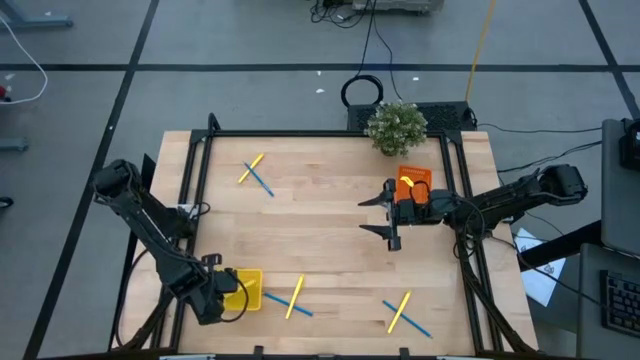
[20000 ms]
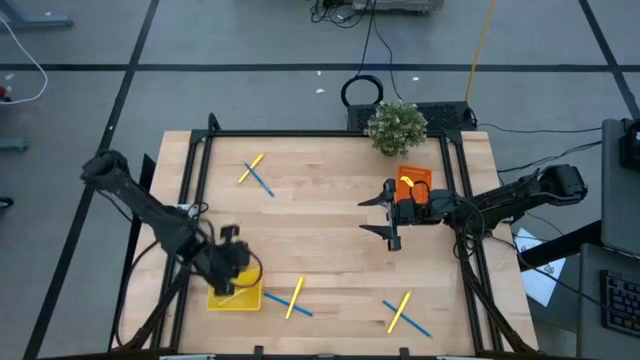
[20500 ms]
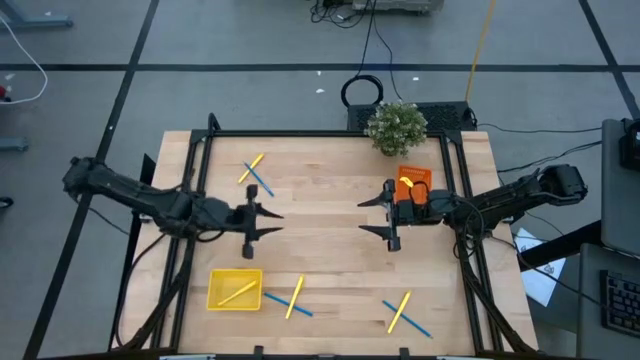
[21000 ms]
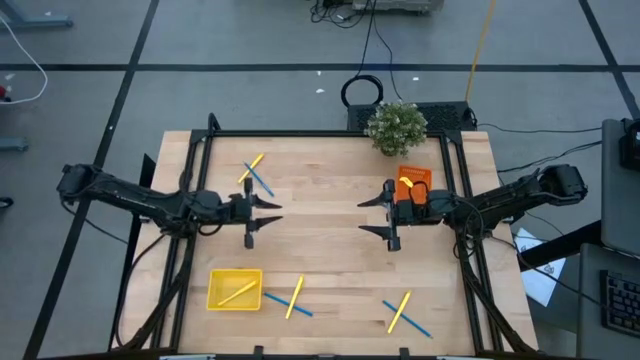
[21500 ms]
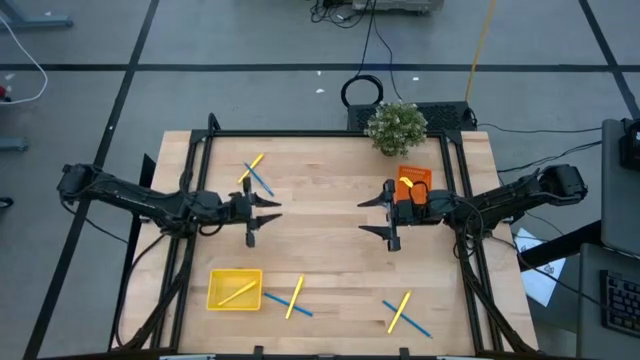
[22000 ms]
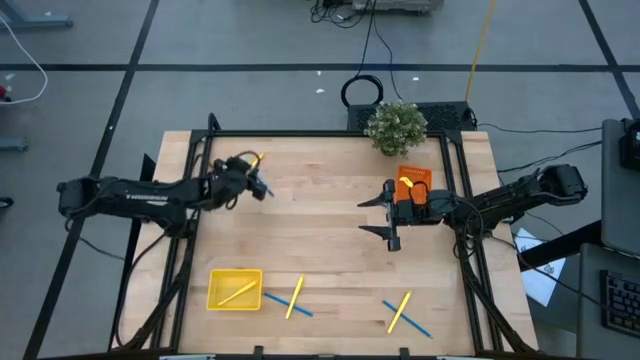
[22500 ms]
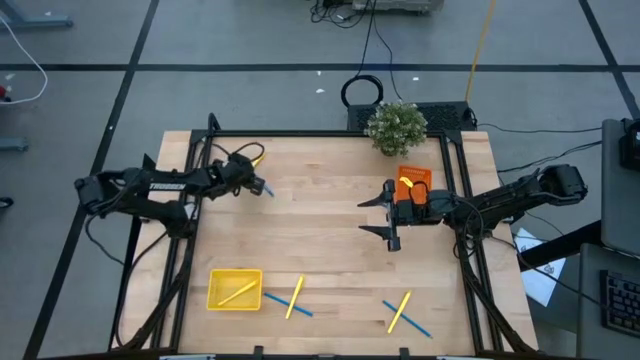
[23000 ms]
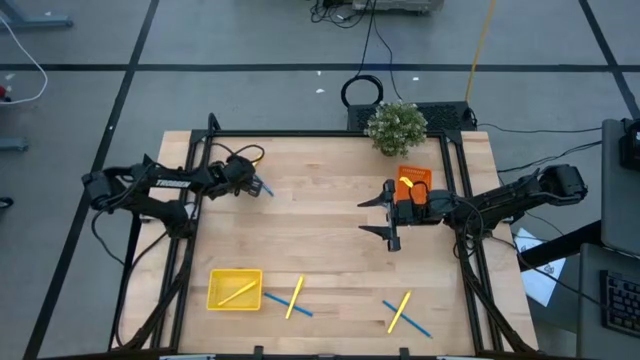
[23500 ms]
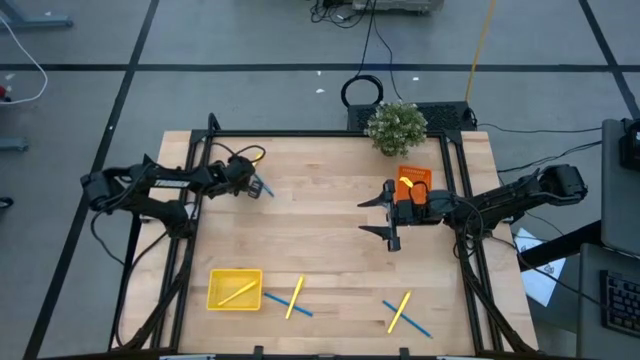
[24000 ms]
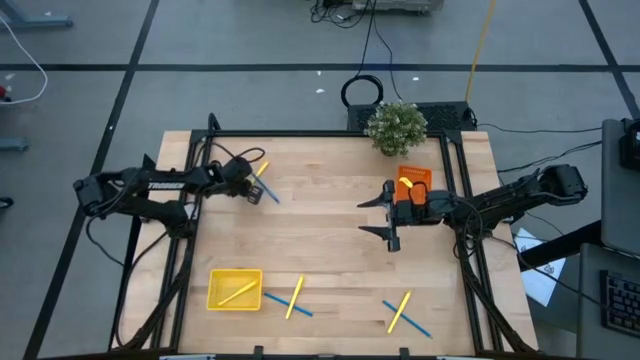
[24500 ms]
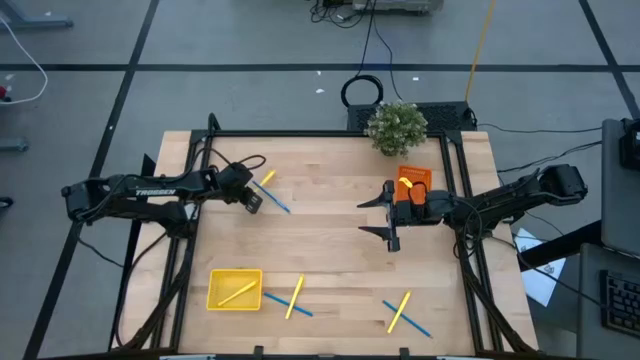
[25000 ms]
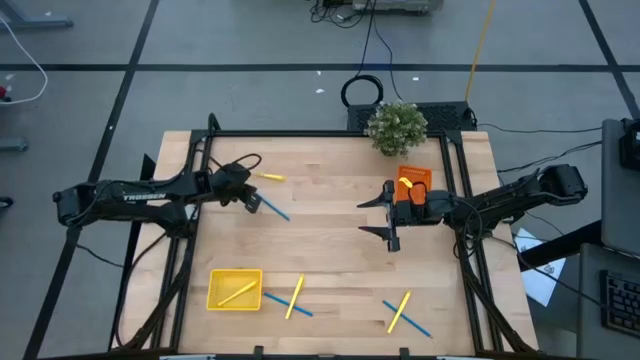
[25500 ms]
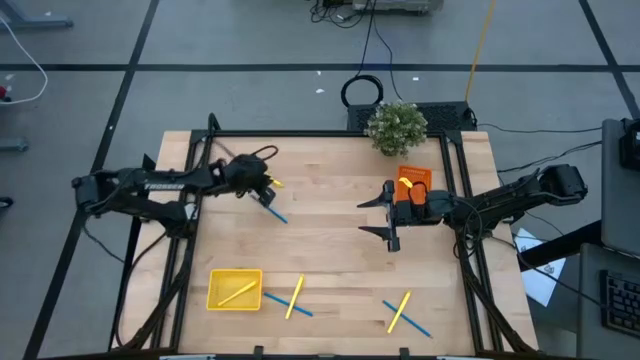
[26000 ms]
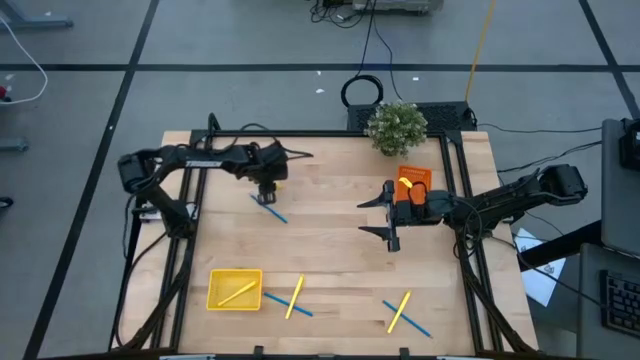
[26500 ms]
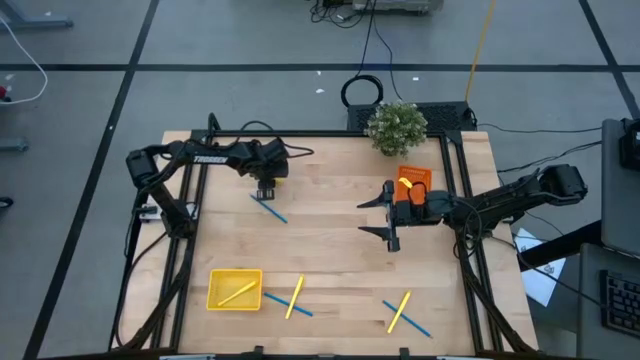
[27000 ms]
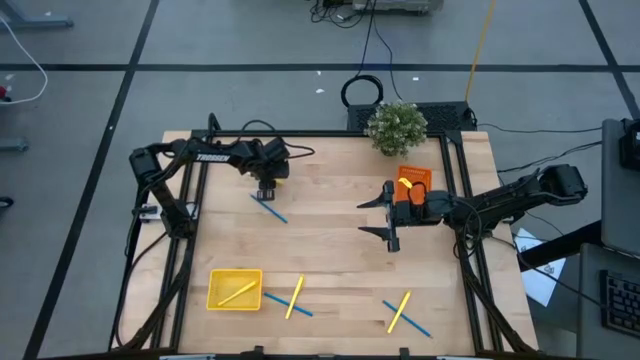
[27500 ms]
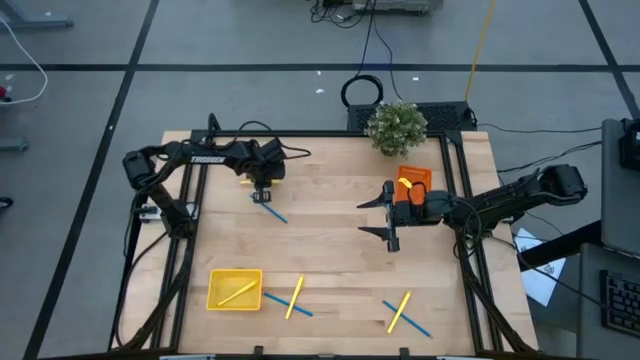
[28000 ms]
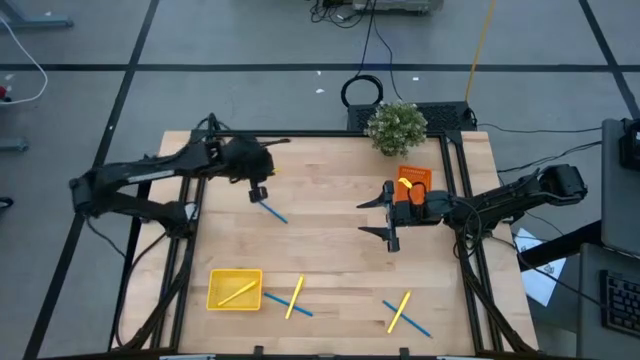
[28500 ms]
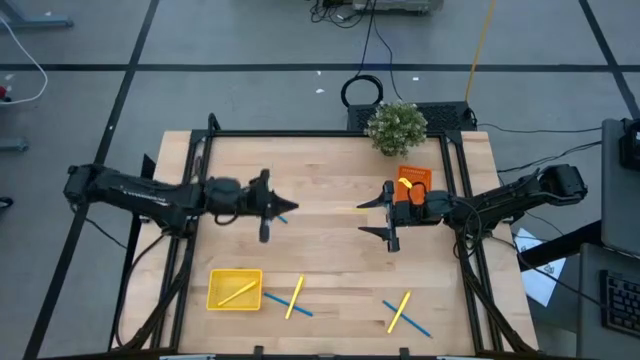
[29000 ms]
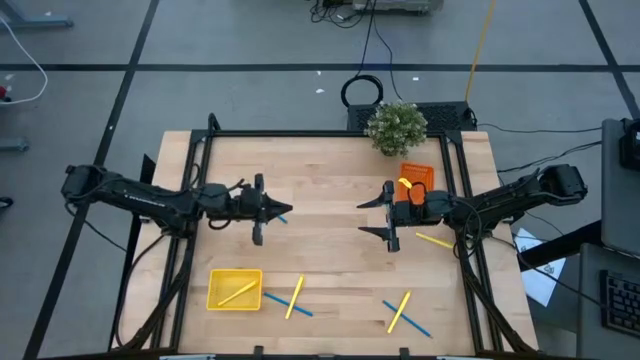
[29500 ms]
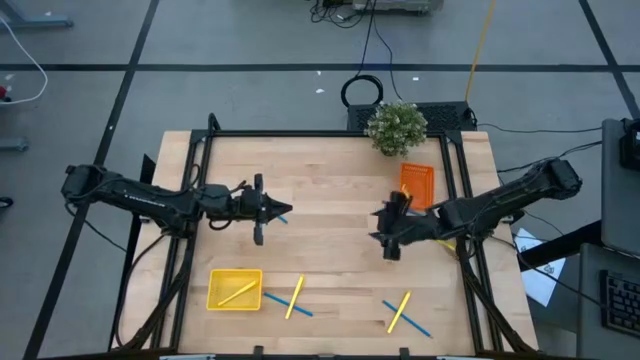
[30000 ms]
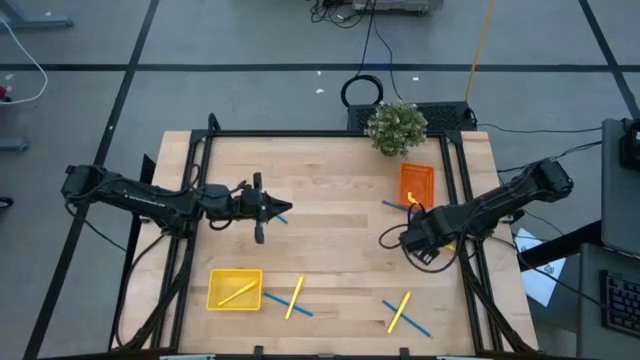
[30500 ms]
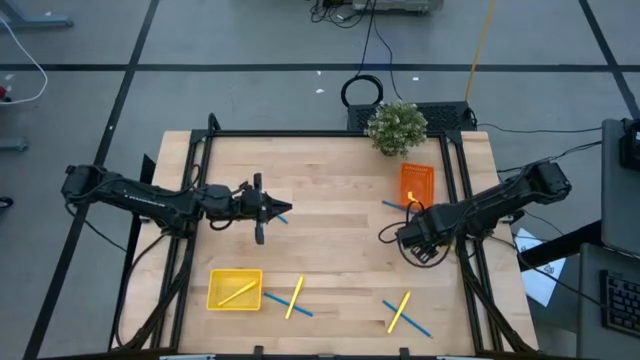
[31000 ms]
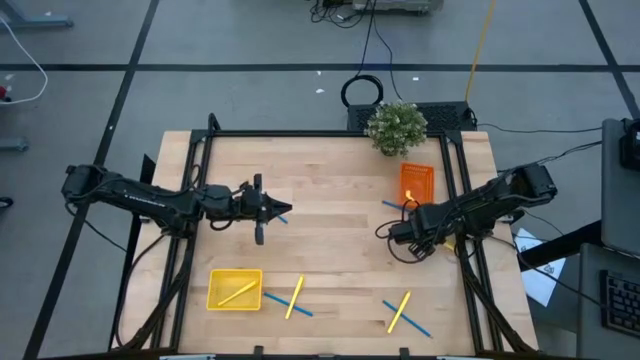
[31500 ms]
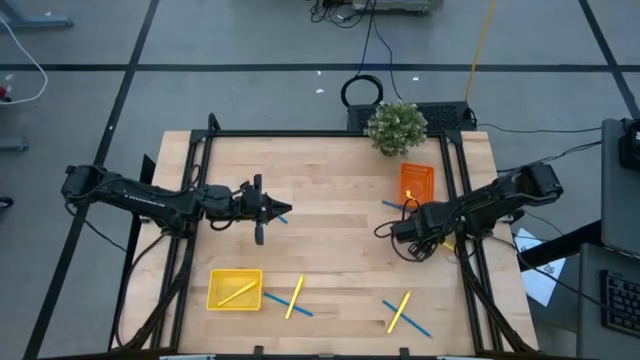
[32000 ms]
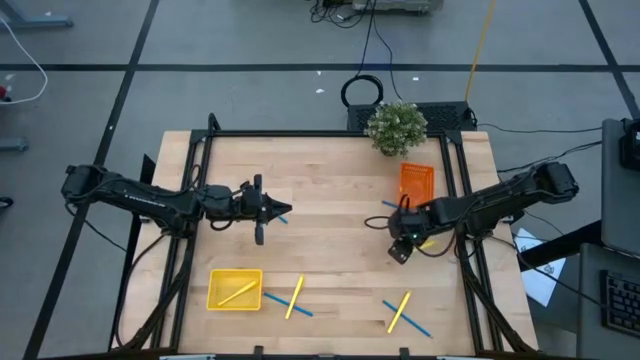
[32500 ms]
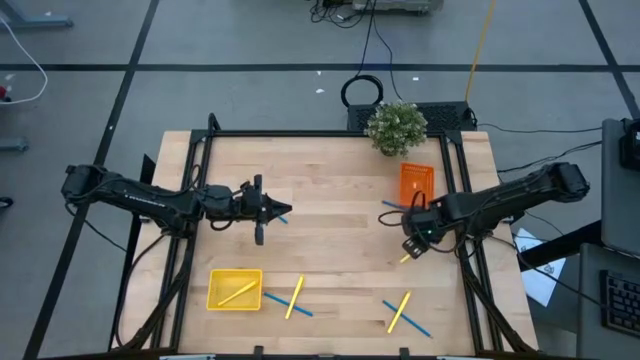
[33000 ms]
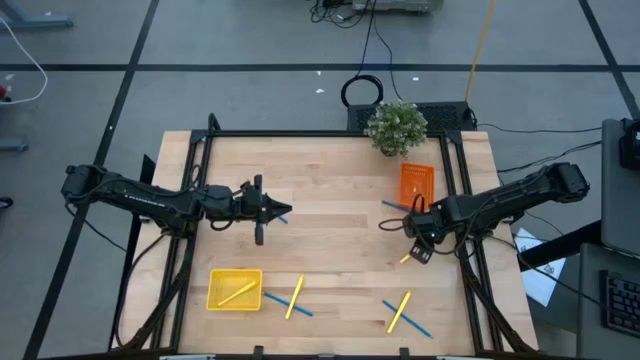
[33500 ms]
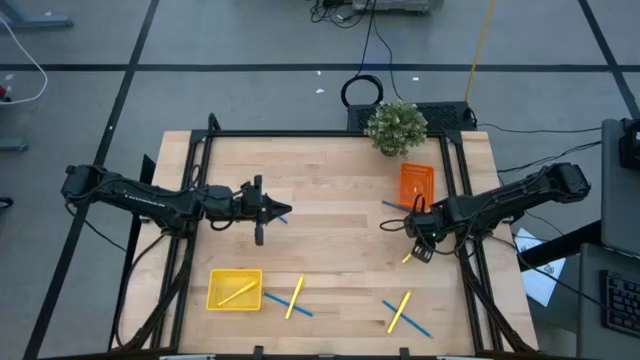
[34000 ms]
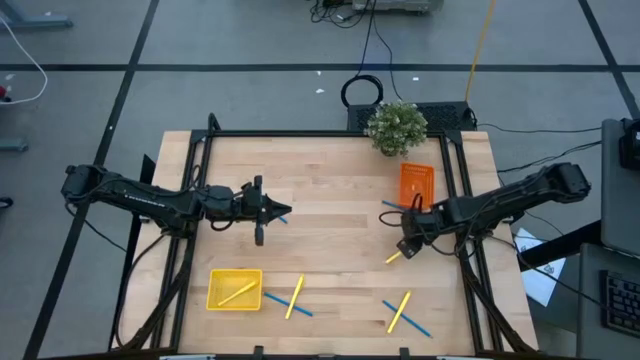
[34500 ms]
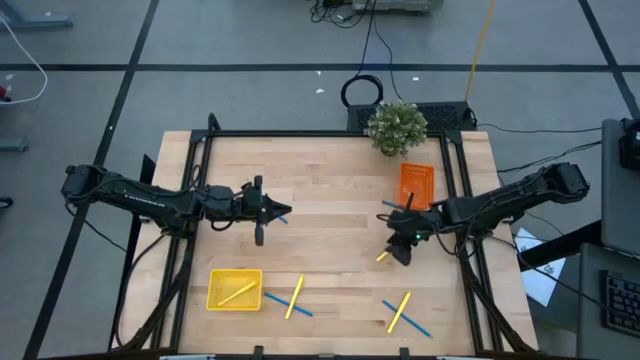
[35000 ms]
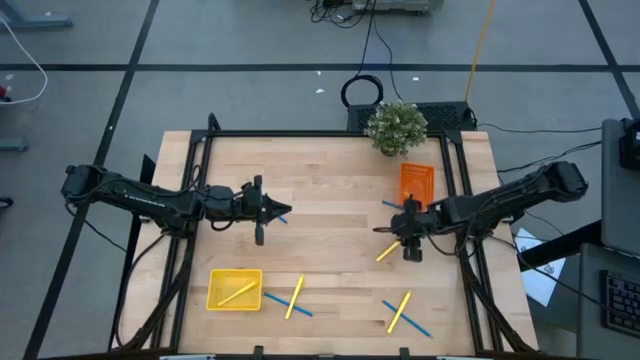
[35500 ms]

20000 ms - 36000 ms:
Task: Sort pens & pencils
Put the top left yellow ballpen into the yellow bin

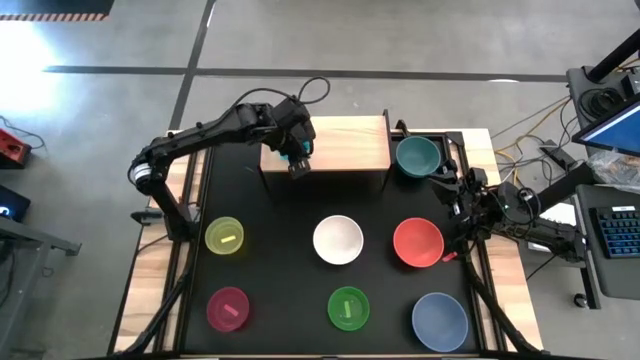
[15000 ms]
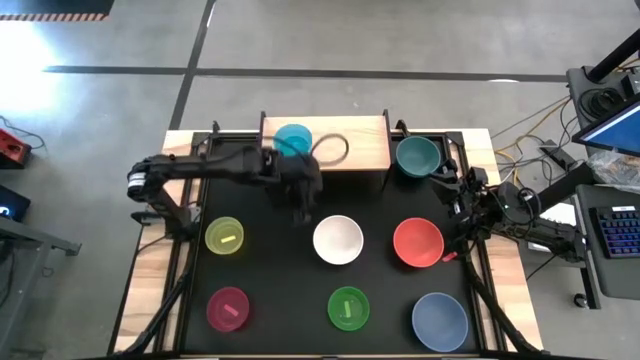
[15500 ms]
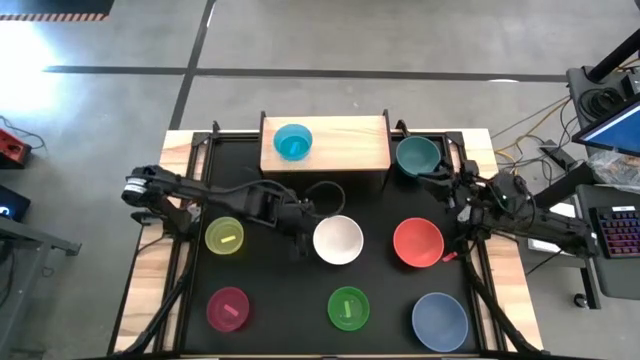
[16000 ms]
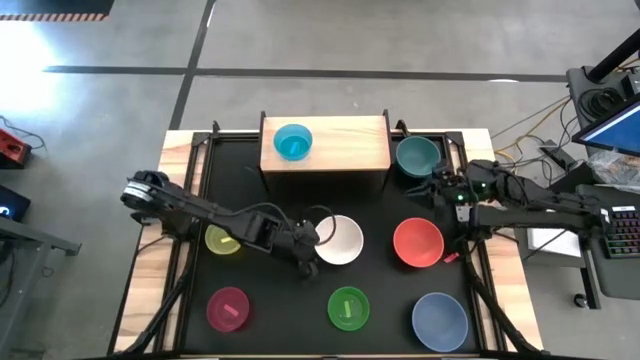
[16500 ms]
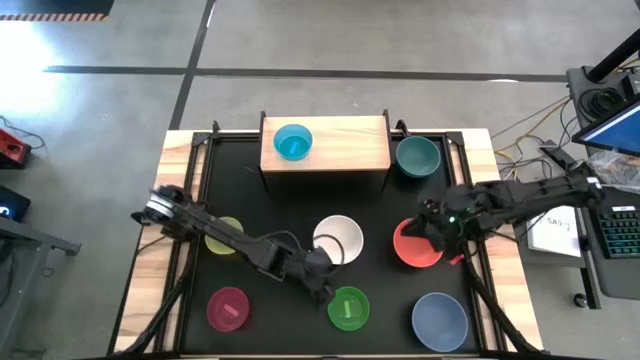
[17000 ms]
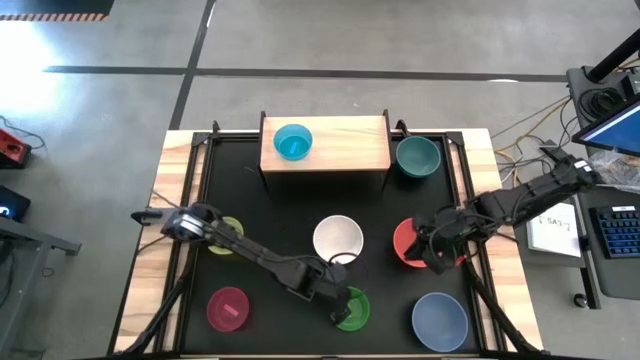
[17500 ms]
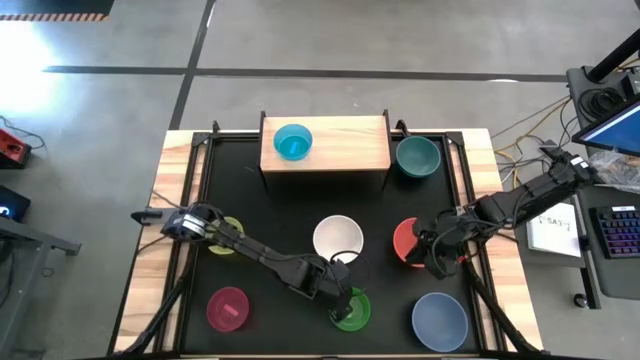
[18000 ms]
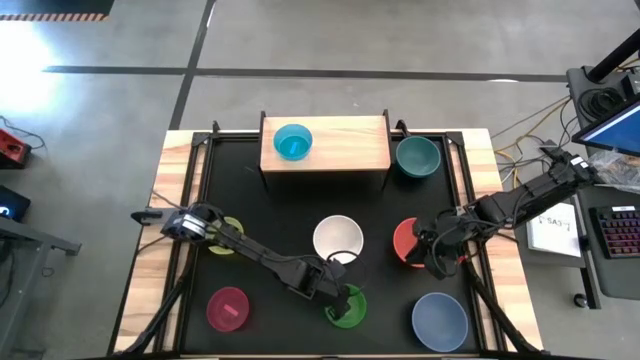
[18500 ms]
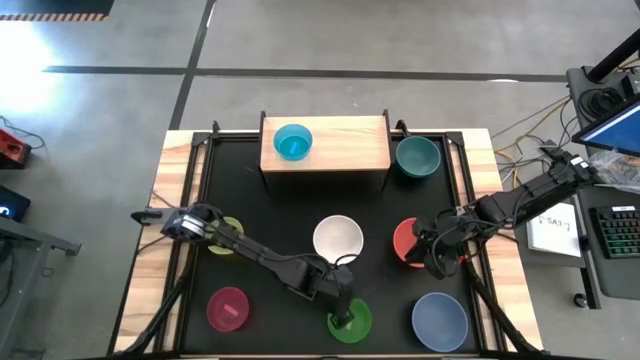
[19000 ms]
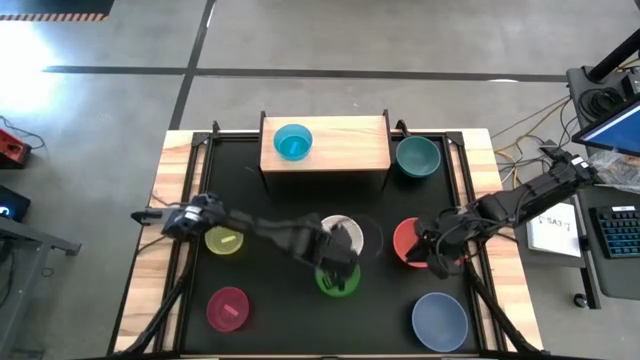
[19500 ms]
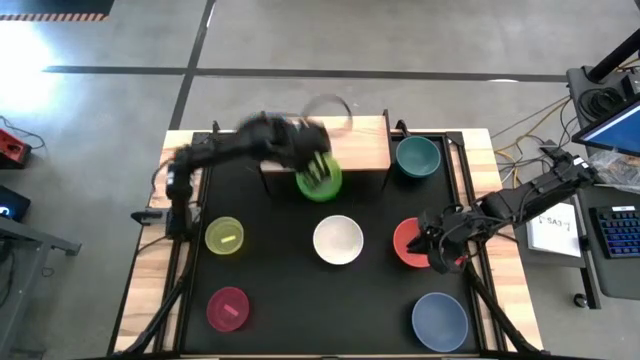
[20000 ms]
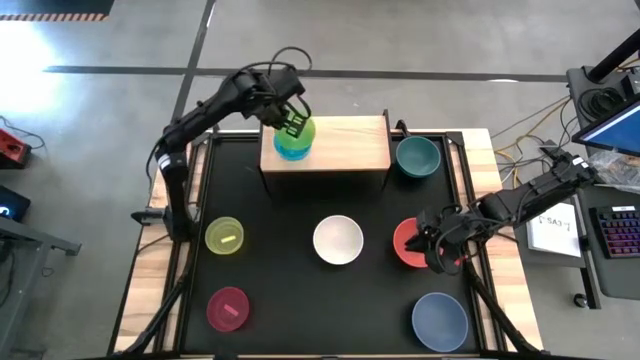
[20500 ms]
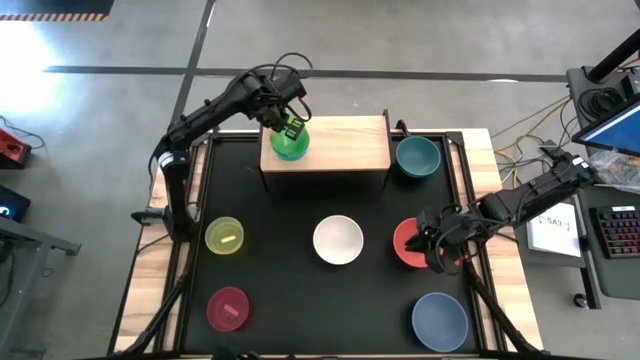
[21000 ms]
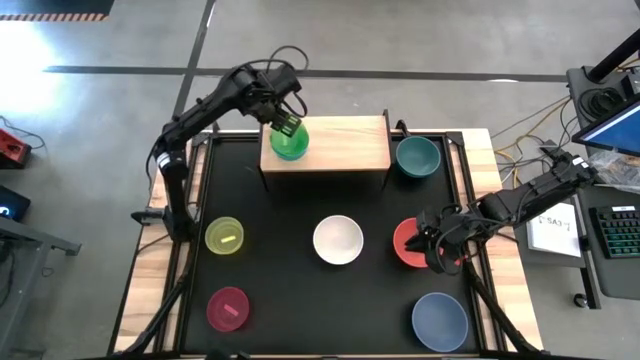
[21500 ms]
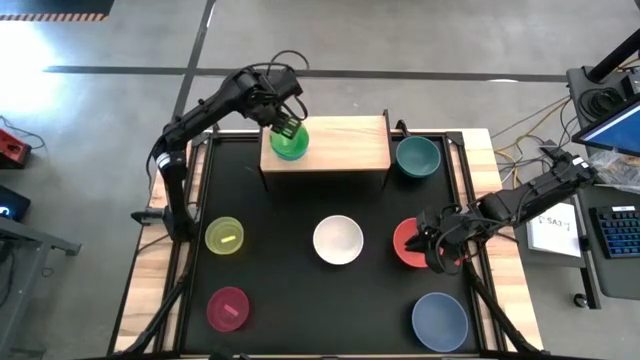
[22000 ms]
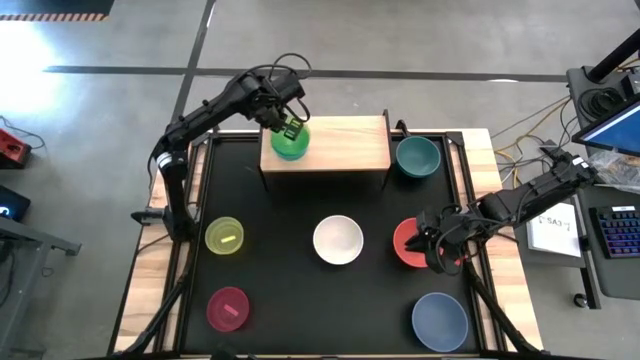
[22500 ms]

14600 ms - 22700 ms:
Task: Place and stack bowls onto a shelf
Stack the small green bowl on top of the small blue bowl on the shelf
